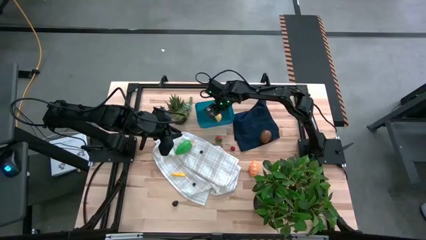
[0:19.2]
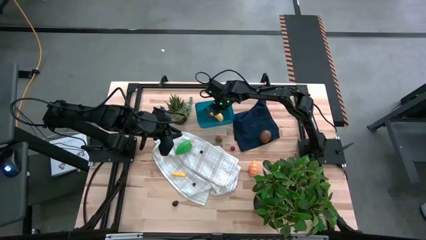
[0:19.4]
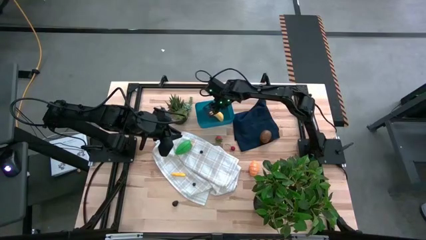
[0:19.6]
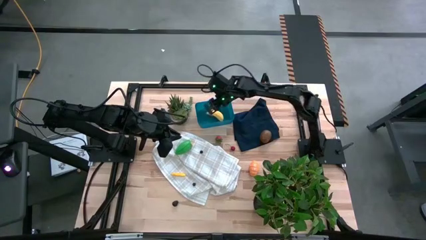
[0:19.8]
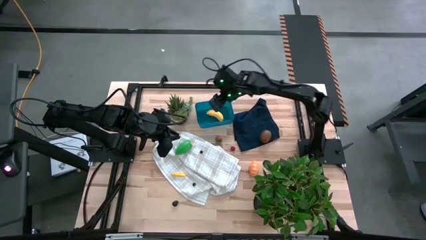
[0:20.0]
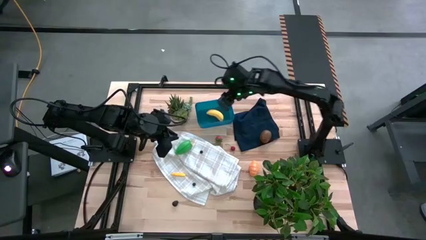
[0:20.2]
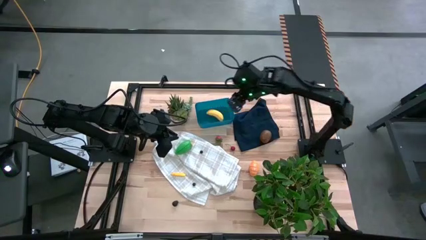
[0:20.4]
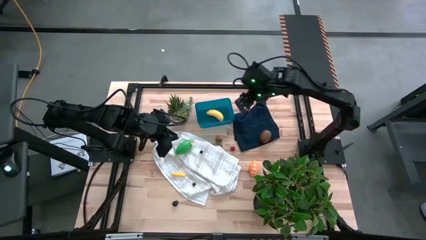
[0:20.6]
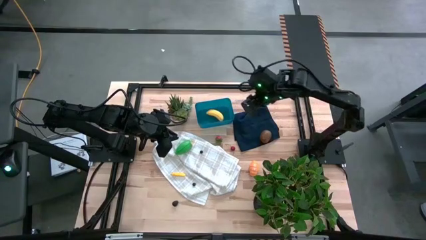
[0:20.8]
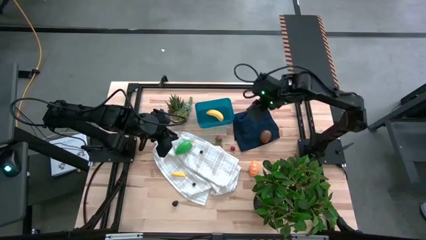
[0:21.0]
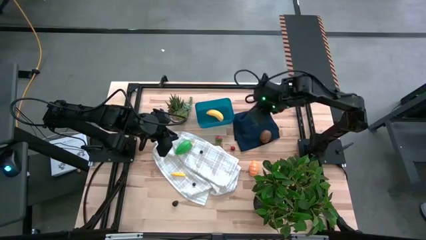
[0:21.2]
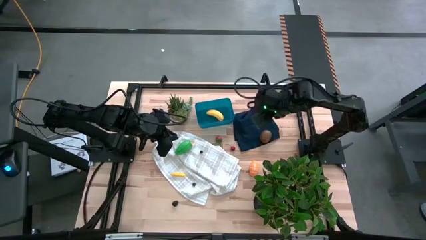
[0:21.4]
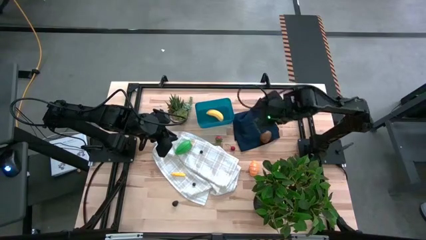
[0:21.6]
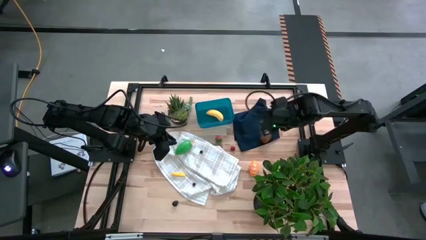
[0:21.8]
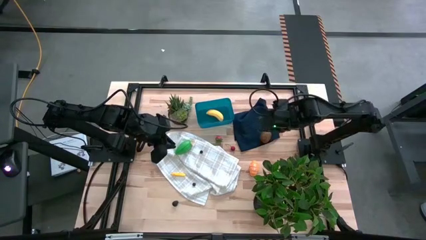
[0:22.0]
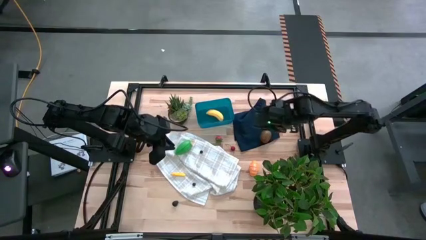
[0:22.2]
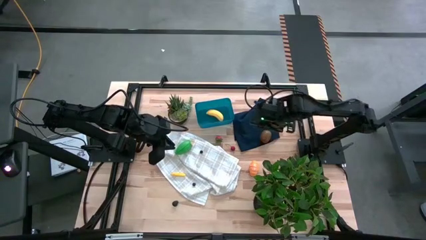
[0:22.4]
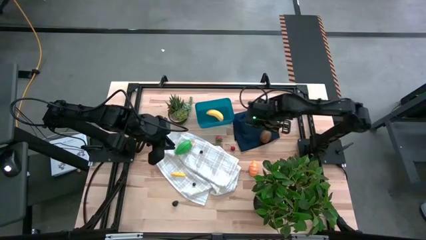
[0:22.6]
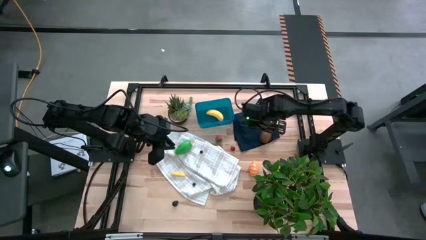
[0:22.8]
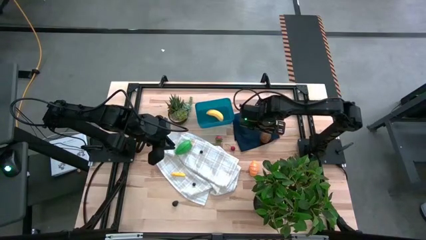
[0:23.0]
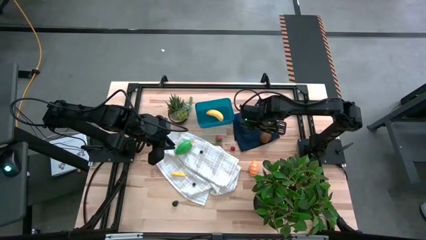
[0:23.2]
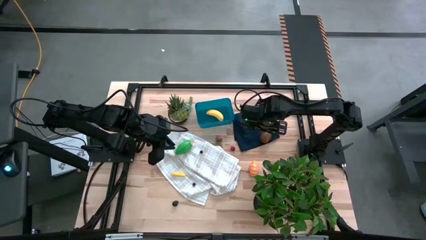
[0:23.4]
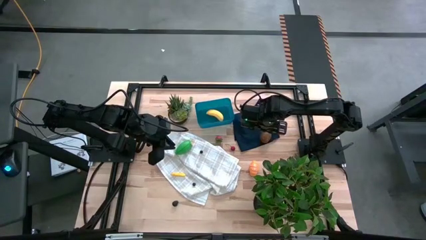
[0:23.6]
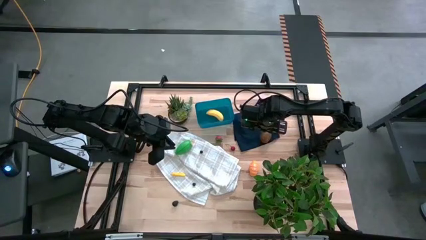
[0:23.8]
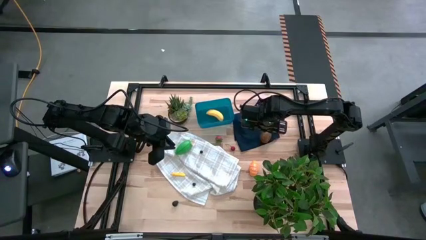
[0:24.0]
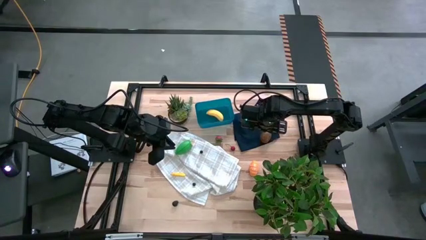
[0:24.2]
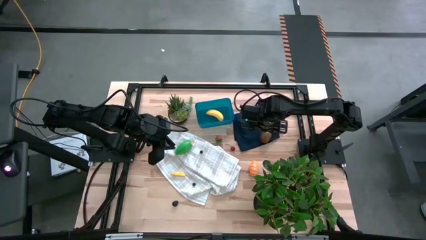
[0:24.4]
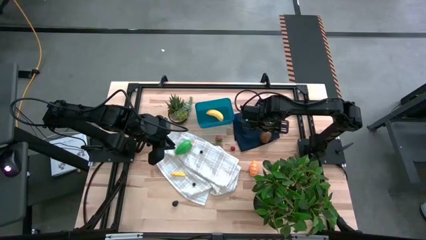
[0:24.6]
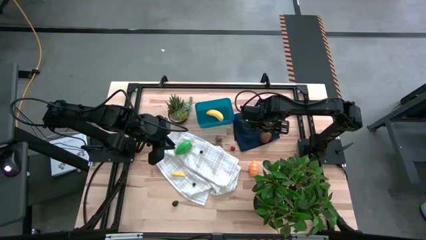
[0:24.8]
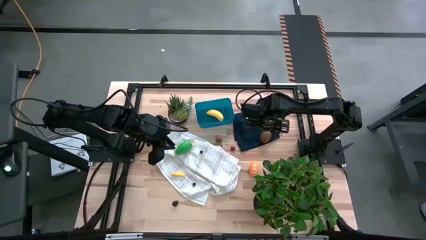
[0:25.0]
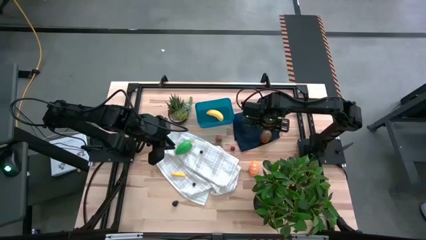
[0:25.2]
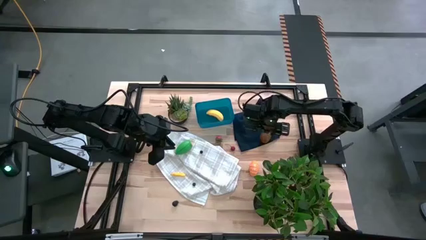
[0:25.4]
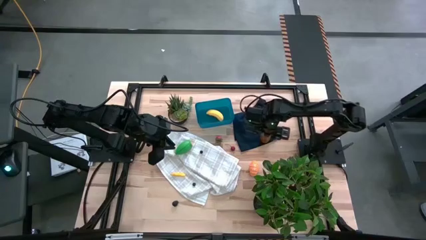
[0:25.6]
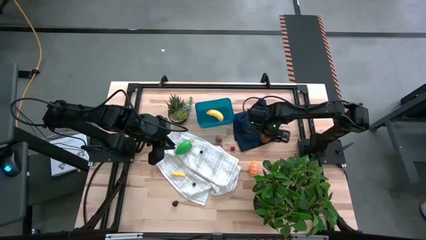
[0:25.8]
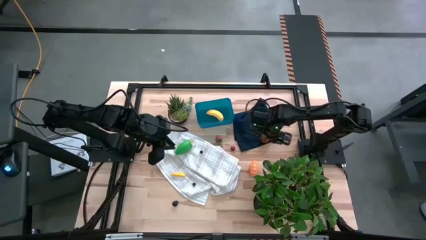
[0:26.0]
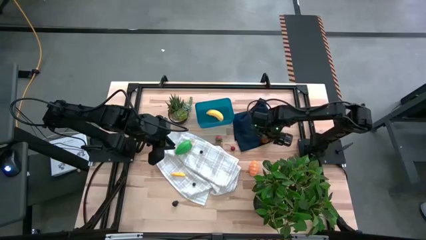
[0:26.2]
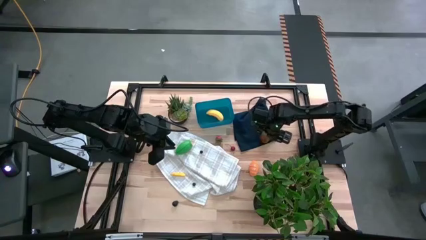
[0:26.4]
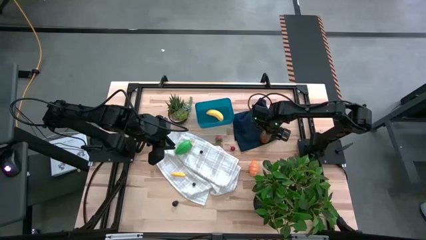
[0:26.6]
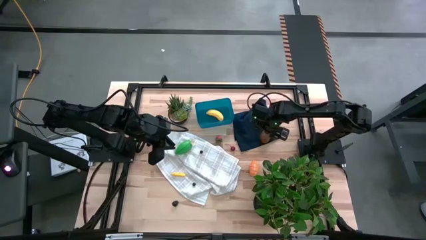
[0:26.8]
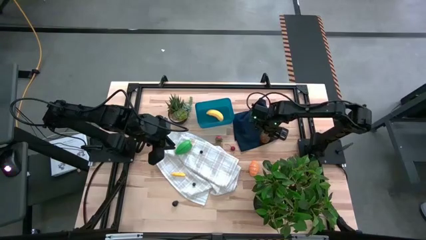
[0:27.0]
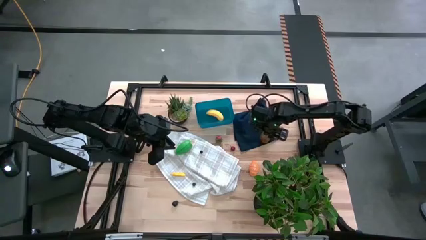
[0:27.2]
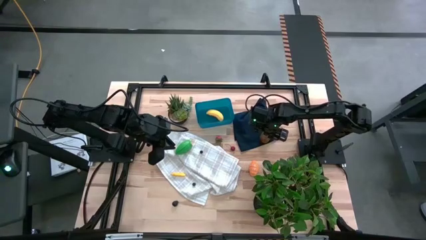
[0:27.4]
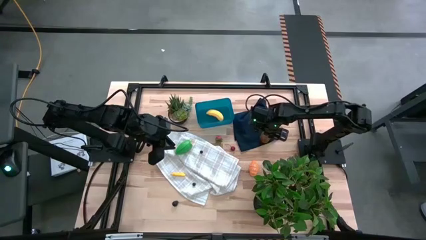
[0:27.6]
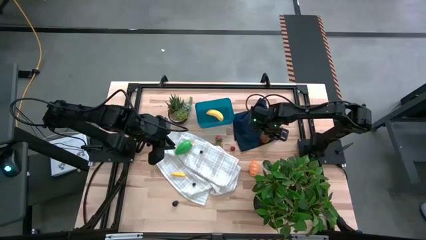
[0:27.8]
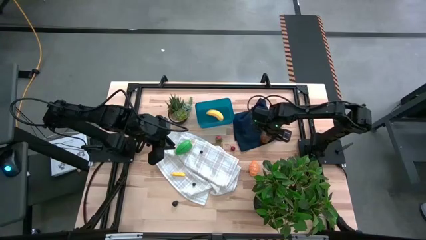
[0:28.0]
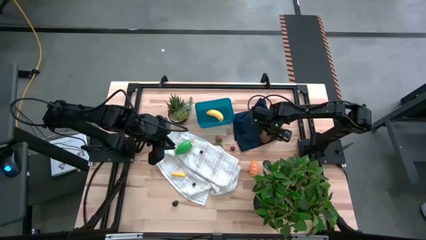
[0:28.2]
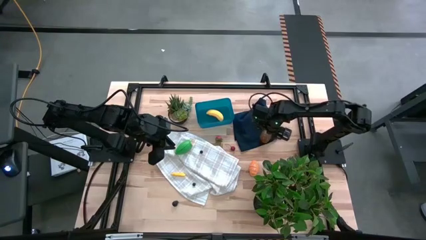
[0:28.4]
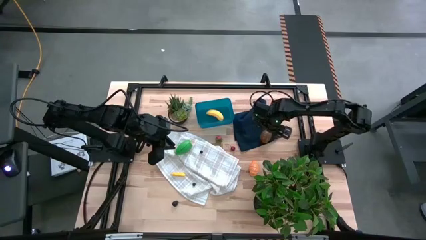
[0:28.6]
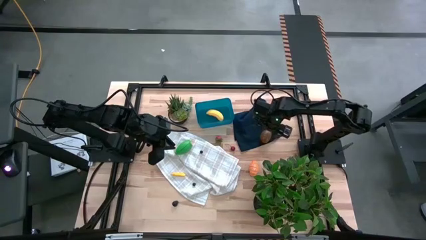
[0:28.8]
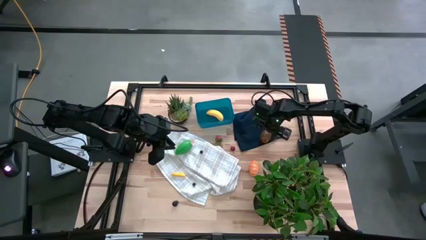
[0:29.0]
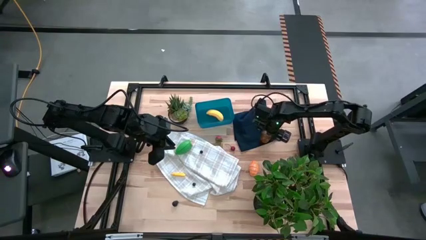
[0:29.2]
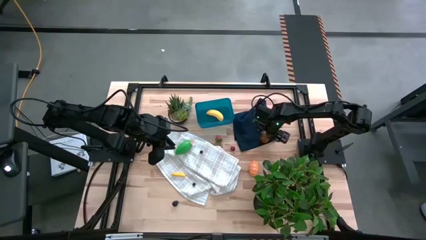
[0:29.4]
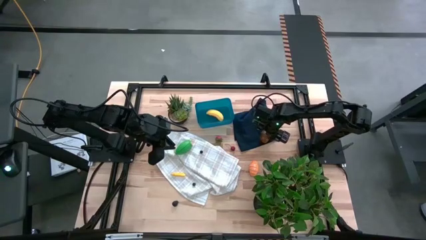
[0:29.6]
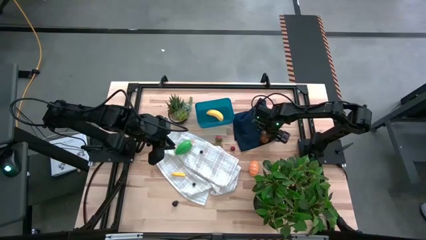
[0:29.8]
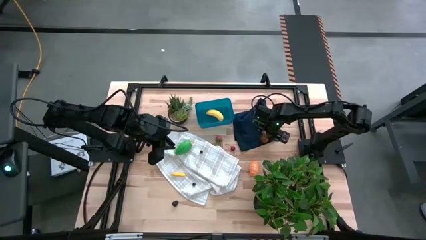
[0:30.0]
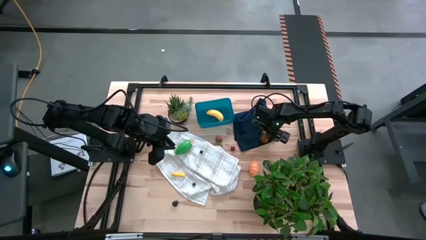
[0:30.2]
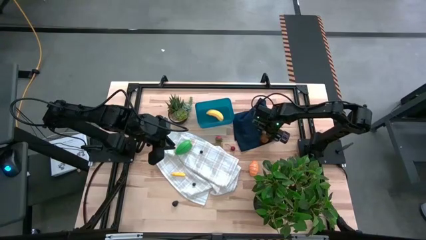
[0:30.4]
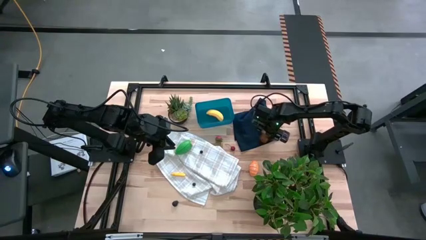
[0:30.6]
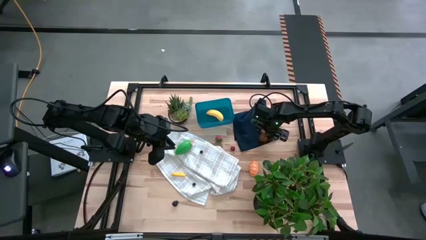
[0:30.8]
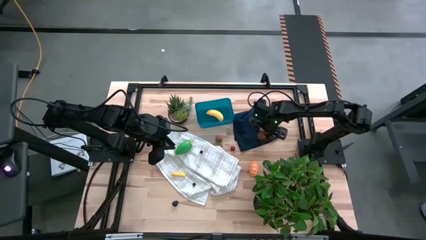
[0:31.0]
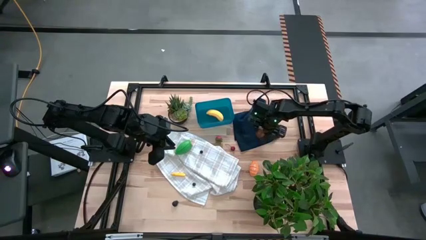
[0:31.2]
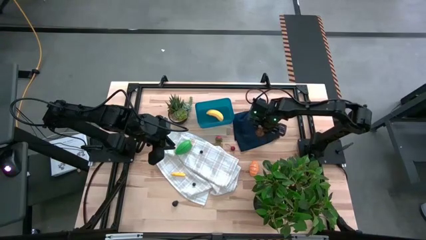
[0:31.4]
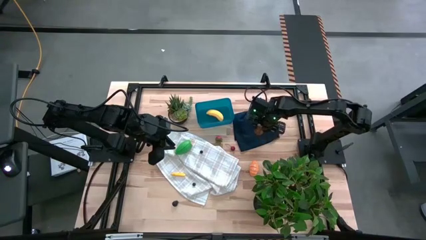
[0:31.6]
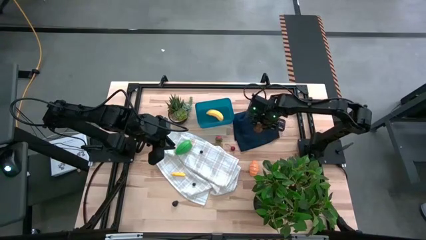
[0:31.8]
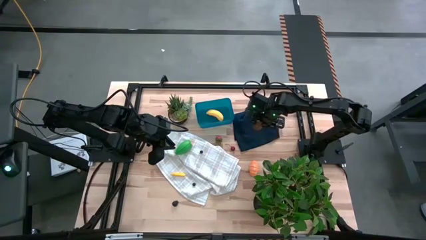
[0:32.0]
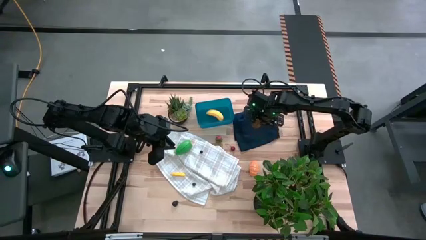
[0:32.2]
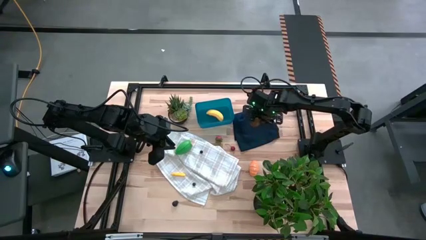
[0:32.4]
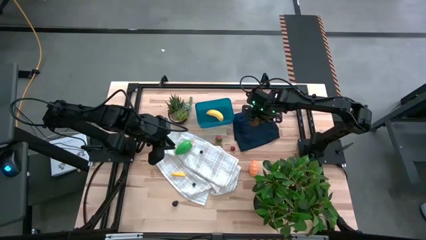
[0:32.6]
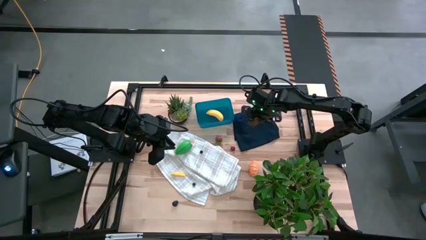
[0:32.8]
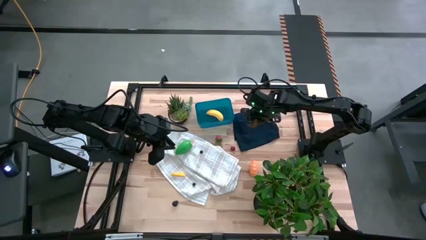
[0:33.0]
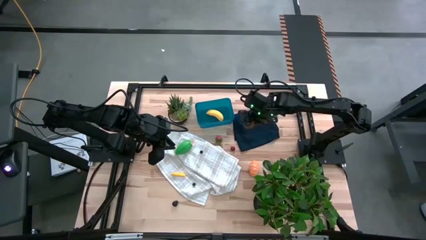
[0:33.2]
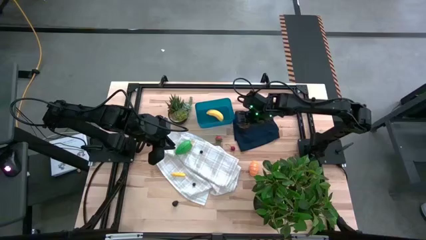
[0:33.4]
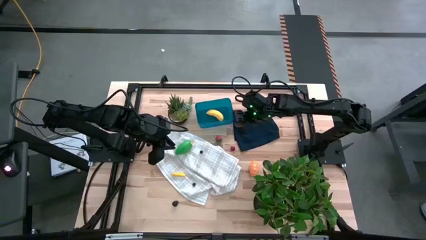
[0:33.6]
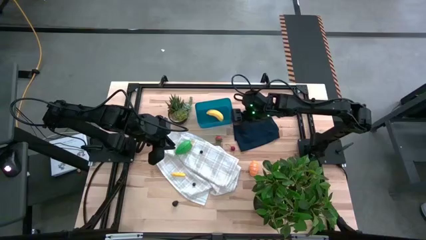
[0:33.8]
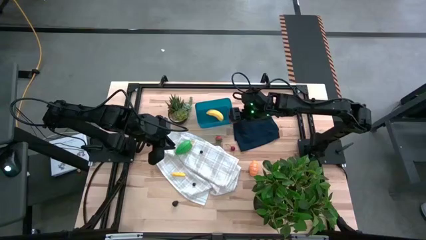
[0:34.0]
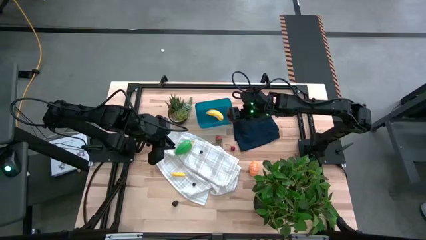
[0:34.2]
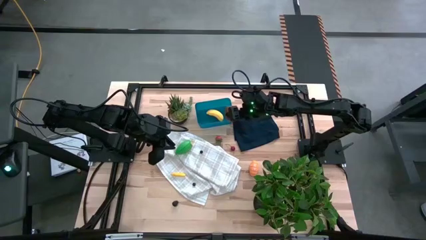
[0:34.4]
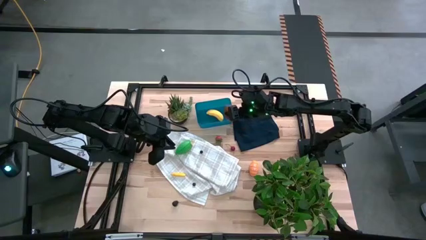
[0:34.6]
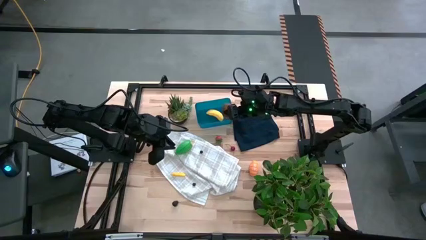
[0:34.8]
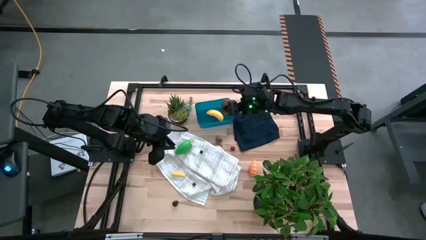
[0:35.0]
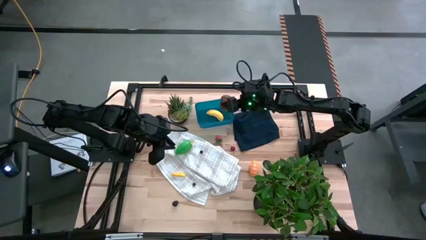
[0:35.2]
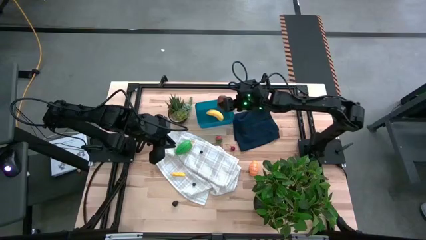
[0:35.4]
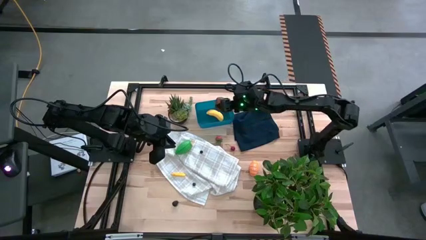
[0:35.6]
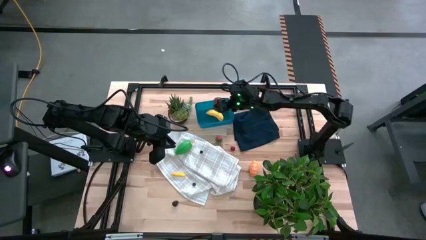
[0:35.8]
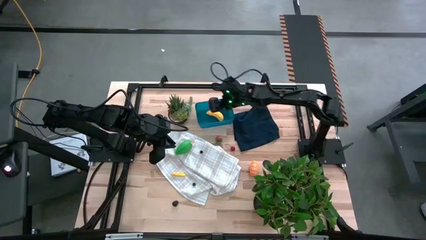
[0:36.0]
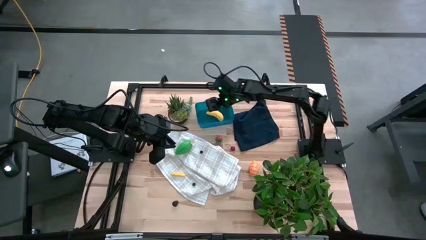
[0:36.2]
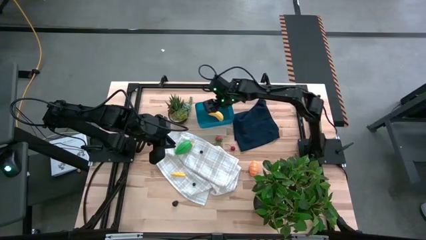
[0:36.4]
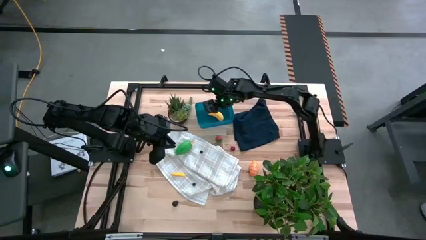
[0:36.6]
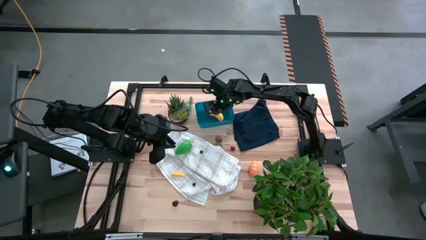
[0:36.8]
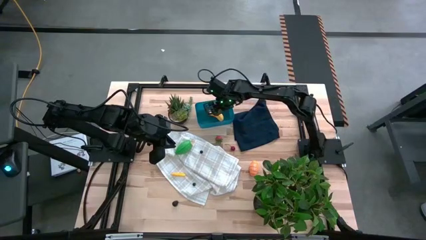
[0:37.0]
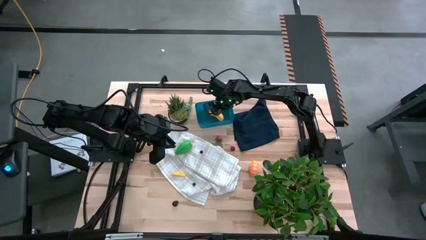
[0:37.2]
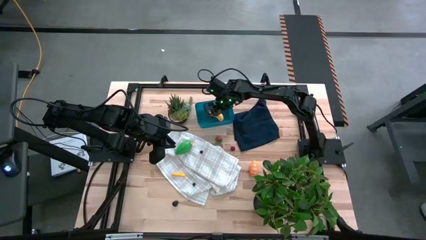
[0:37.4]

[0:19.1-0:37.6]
Task: Pick and placing Produce into tupperware
Put the kiwi into the blue bin
